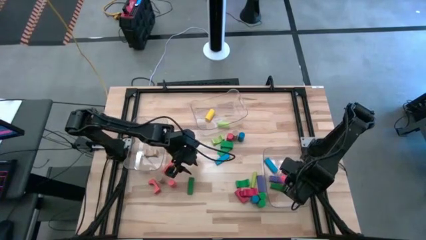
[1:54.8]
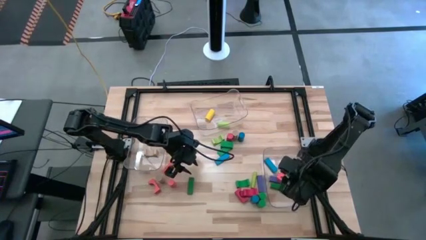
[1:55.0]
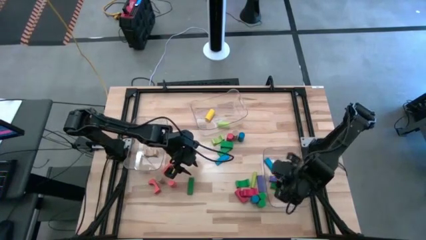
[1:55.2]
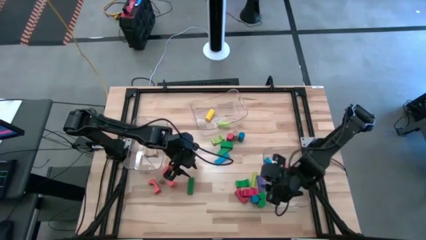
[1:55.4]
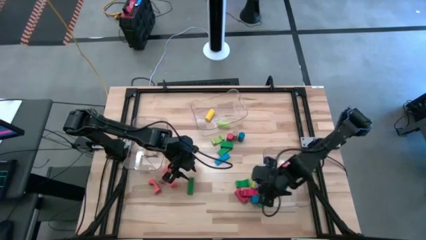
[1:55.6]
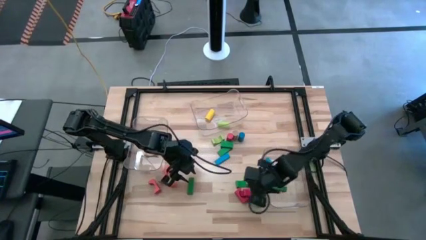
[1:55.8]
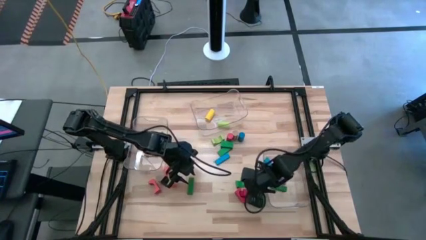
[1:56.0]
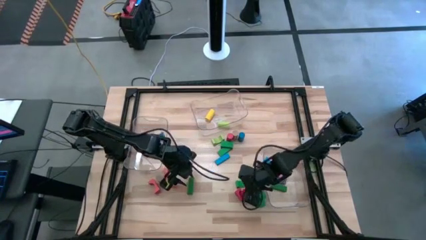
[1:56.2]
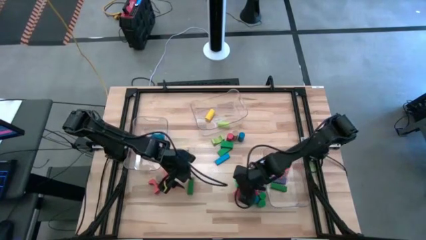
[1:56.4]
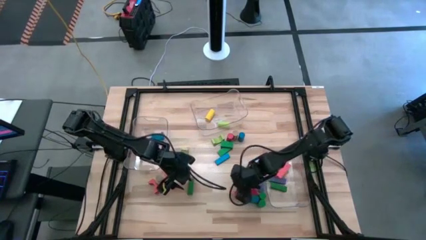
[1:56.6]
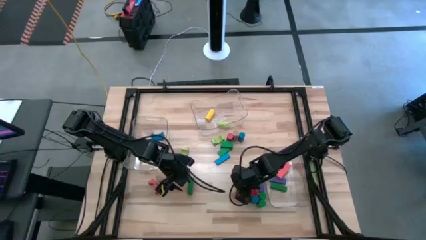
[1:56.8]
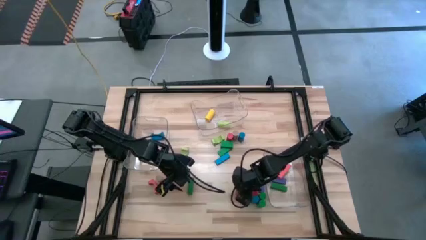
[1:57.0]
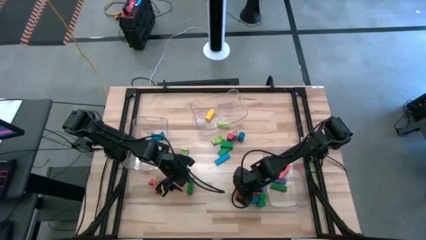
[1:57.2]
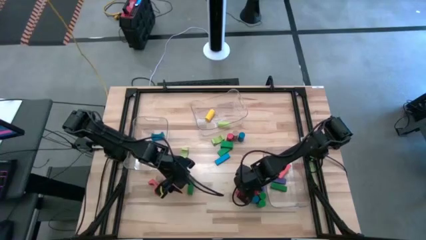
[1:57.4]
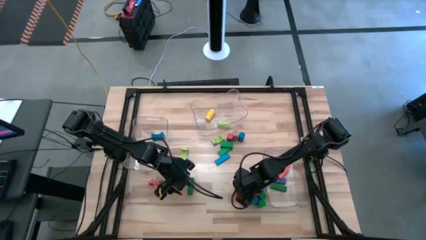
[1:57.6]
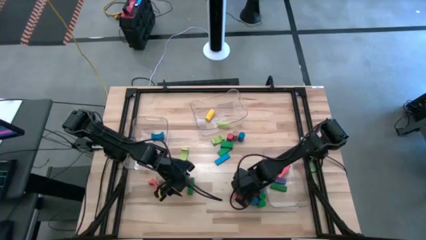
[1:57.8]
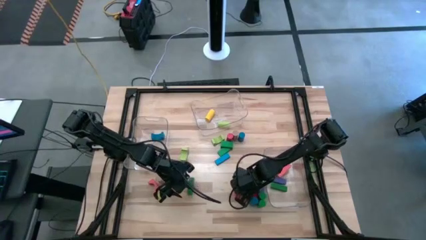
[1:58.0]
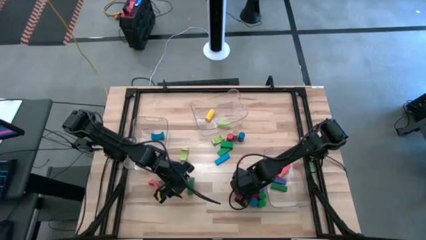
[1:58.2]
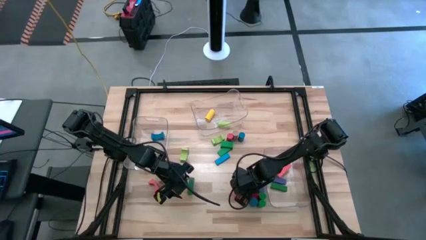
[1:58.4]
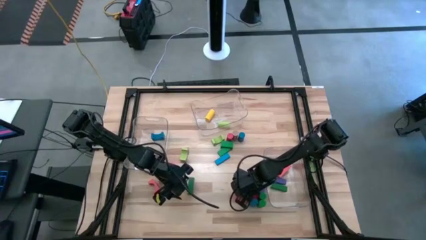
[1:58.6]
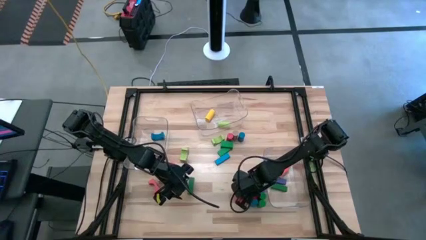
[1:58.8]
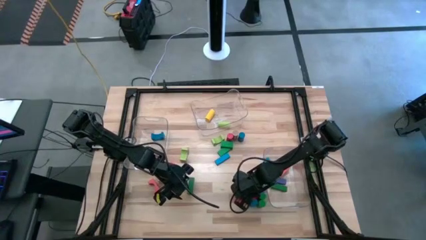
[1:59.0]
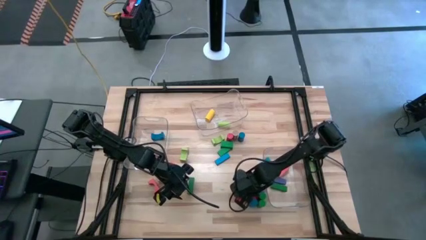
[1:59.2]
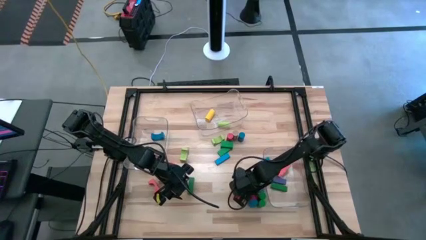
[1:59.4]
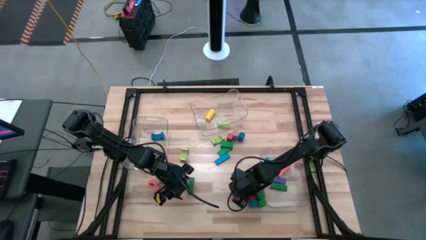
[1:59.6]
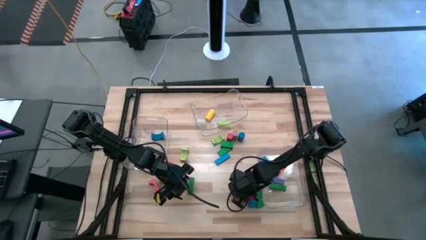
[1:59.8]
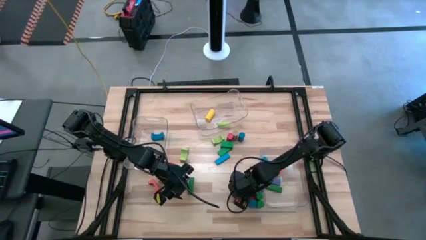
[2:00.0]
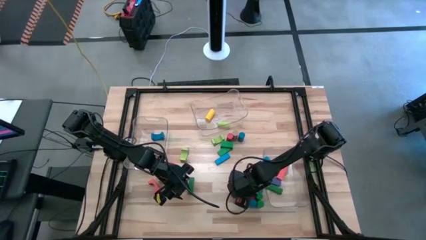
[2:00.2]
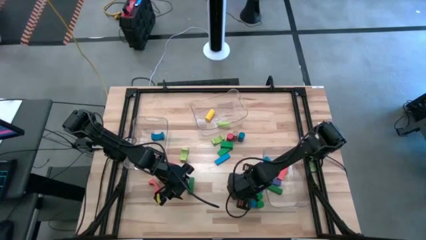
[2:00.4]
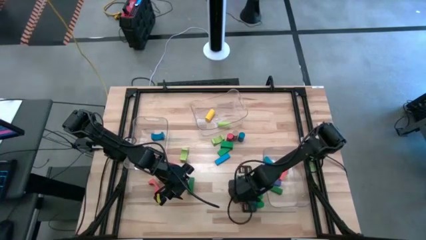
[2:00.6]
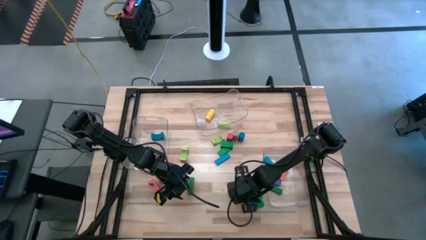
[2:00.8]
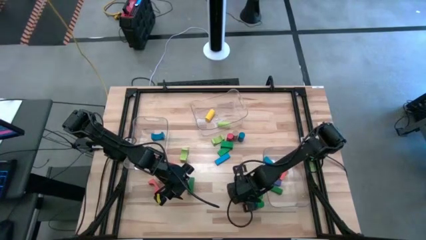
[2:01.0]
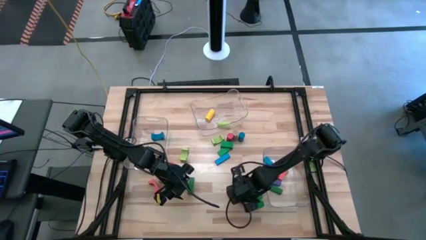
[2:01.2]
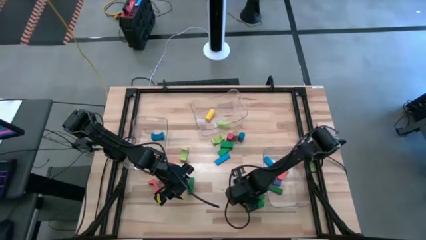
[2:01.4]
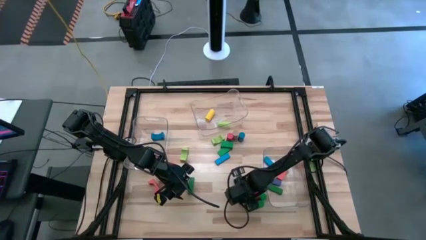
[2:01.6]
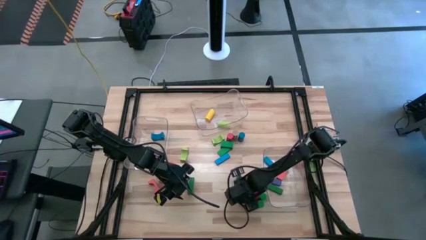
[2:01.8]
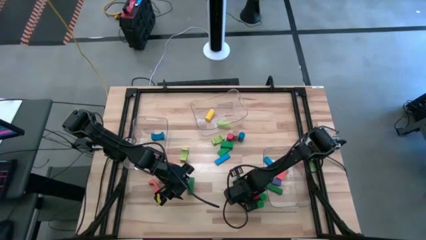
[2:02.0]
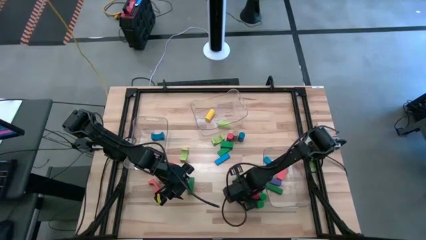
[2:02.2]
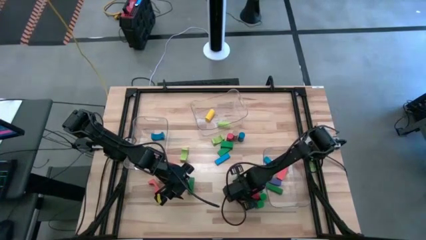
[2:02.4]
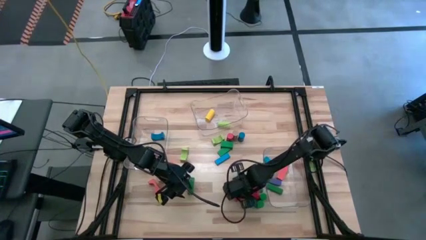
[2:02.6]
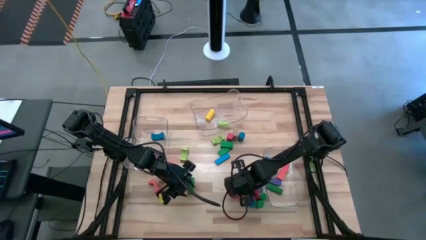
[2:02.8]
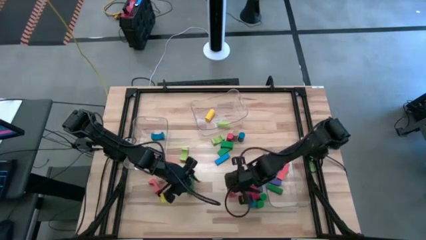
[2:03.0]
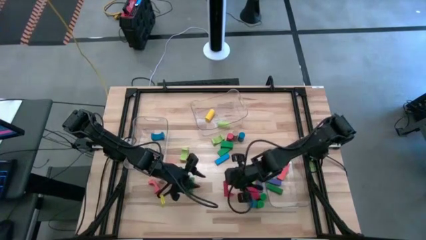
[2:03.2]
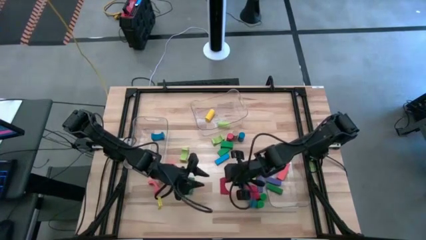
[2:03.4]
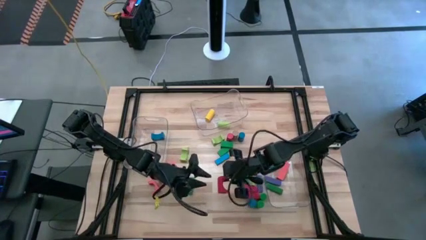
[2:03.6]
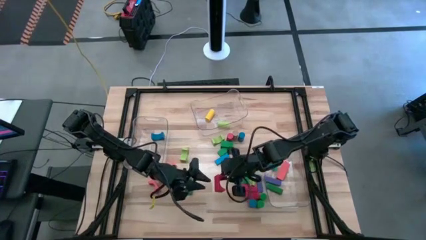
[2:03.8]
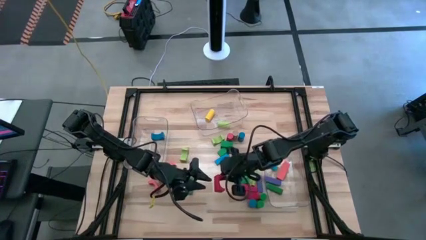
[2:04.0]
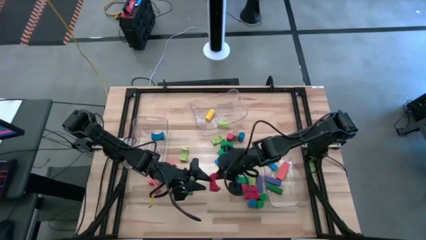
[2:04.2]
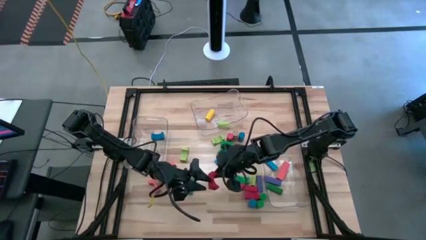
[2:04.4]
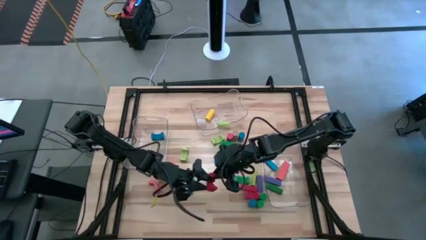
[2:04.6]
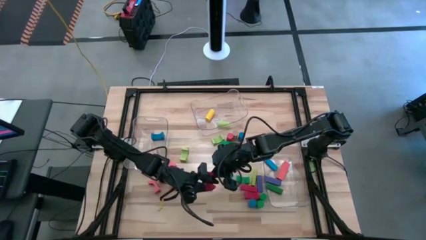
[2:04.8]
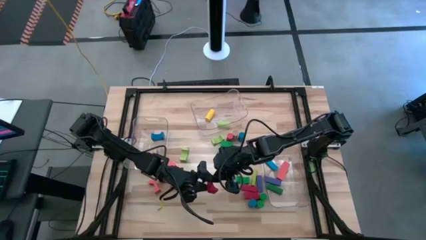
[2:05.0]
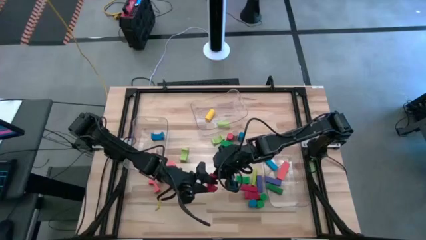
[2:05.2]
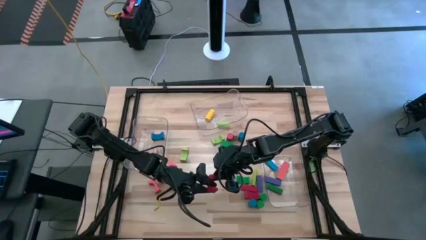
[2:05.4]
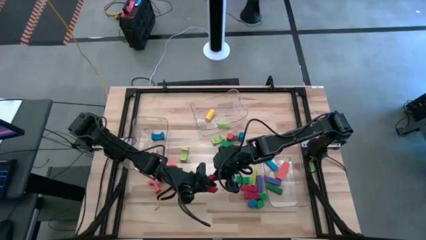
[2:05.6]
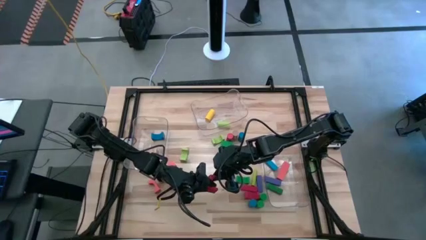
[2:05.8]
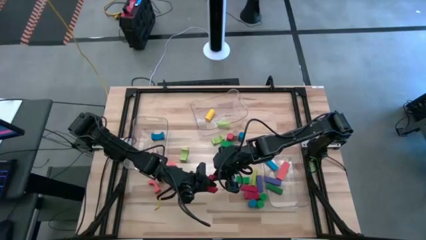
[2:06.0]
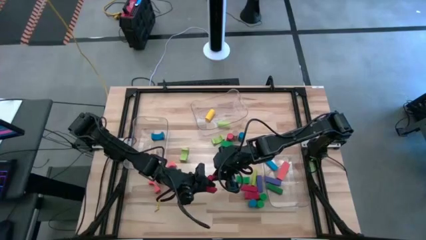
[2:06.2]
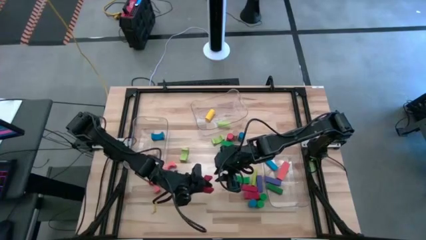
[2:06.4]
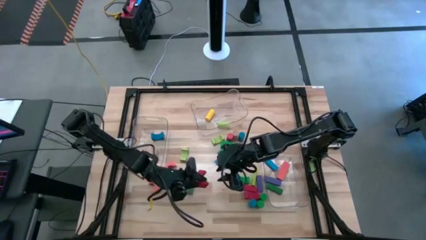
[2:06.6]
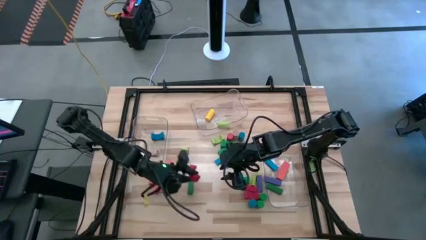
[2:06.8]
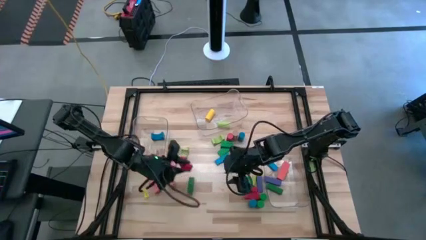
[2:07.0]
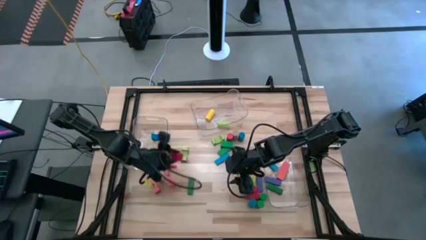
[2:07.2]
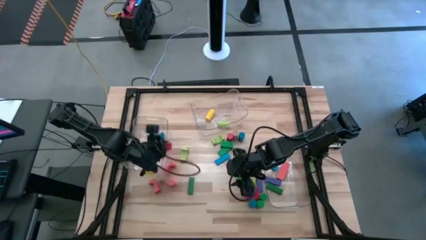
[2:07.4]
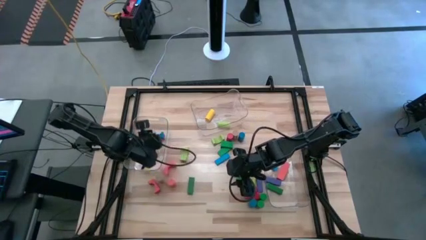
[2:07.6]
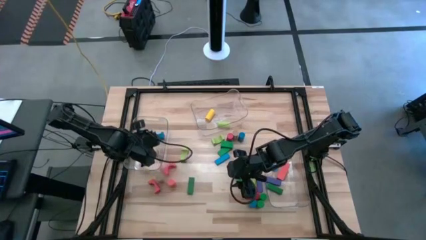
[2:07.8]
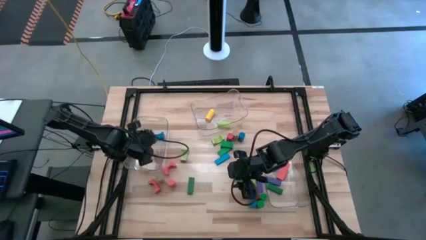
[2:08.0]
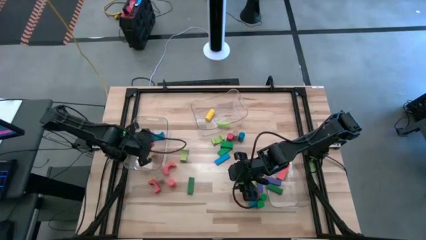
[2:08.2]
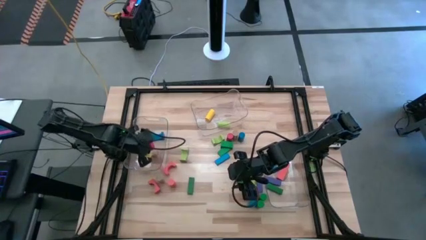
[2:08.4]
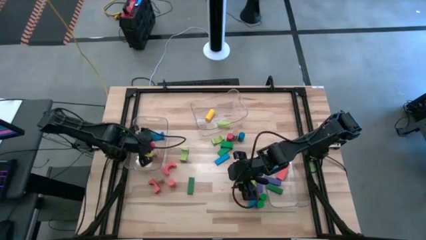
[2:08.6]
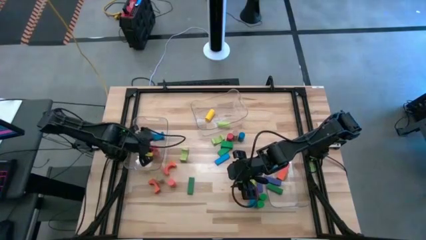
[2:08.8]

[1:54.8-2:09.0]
Task: Sort blocks by size
Put the orange arch block into the left transparent bin
